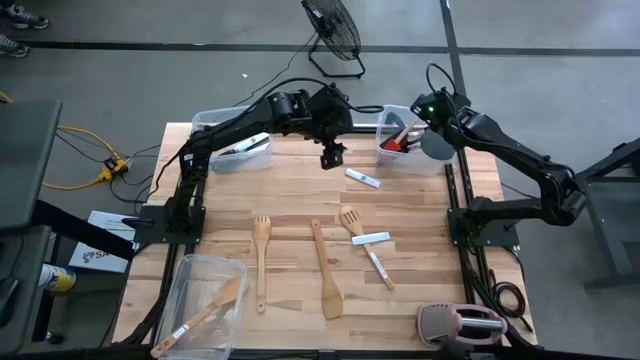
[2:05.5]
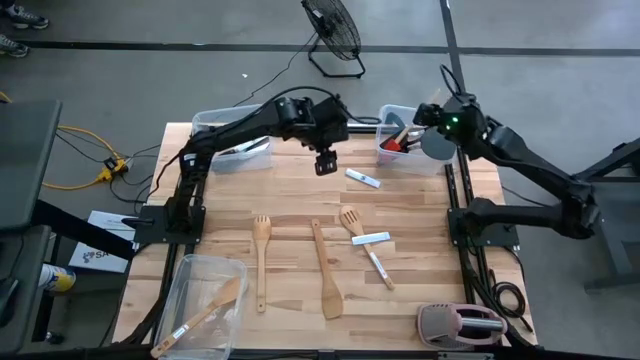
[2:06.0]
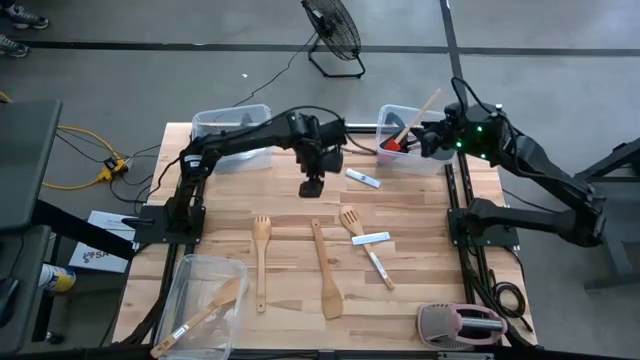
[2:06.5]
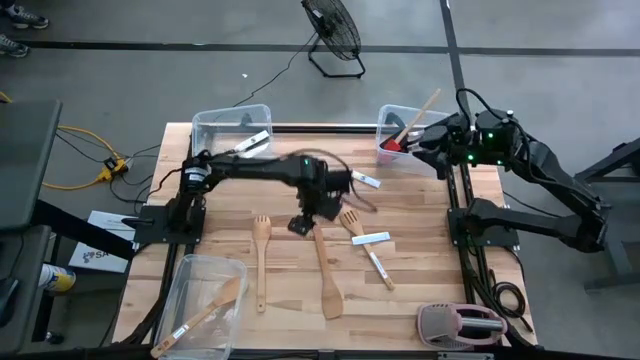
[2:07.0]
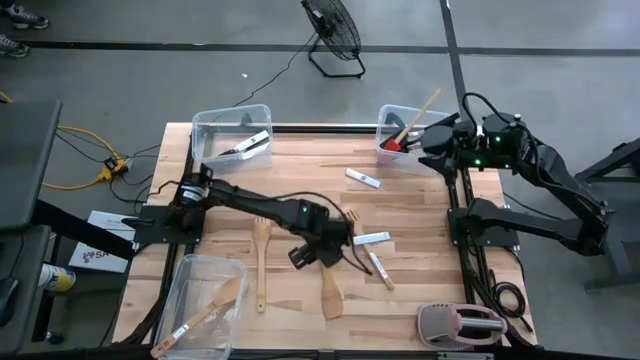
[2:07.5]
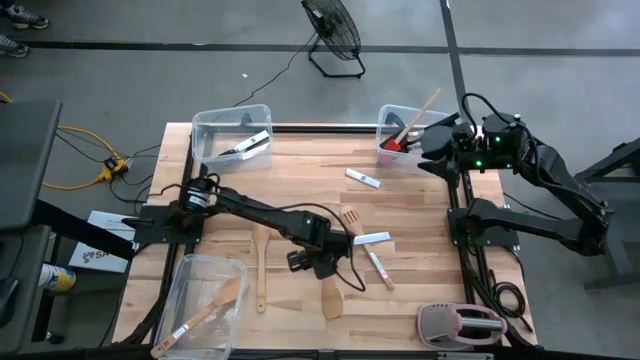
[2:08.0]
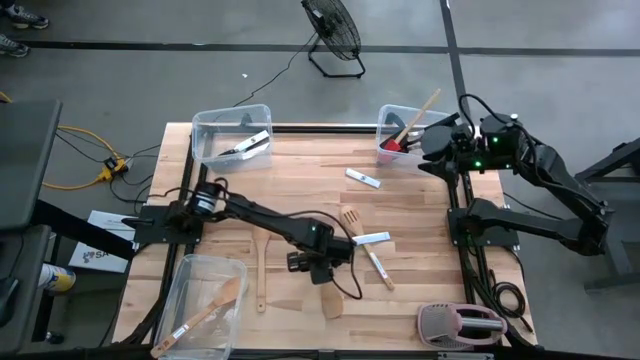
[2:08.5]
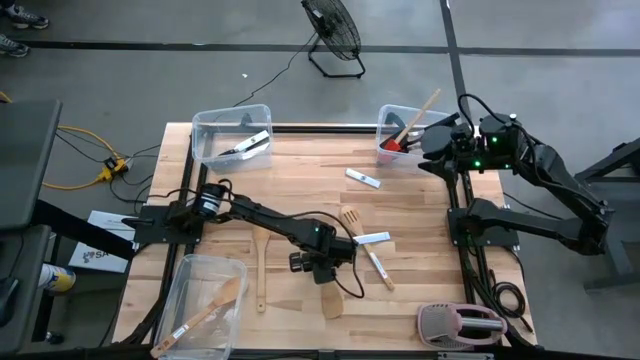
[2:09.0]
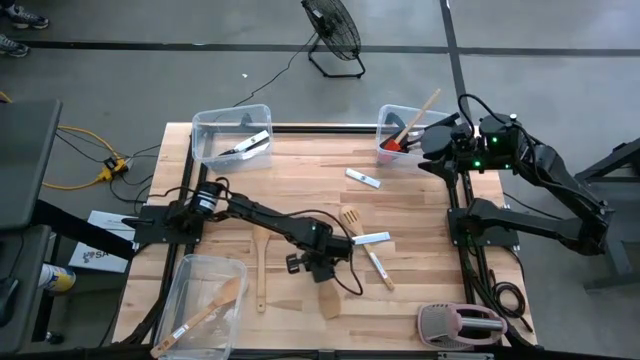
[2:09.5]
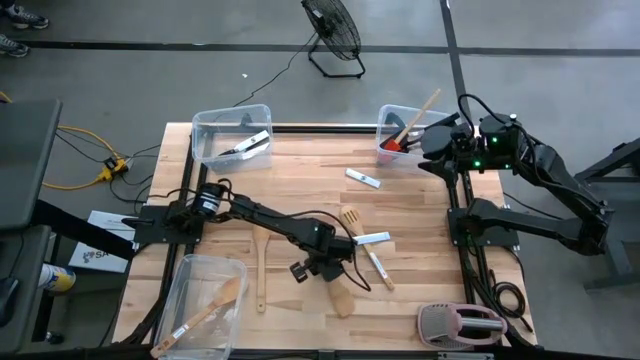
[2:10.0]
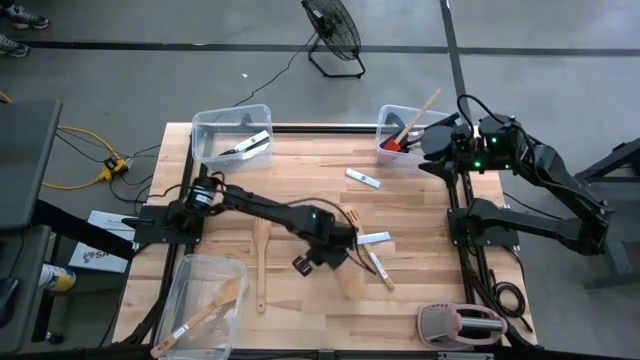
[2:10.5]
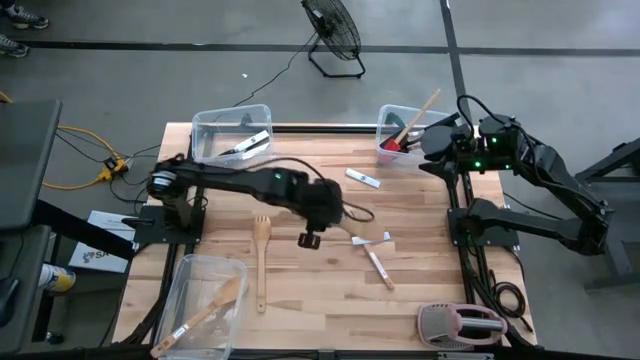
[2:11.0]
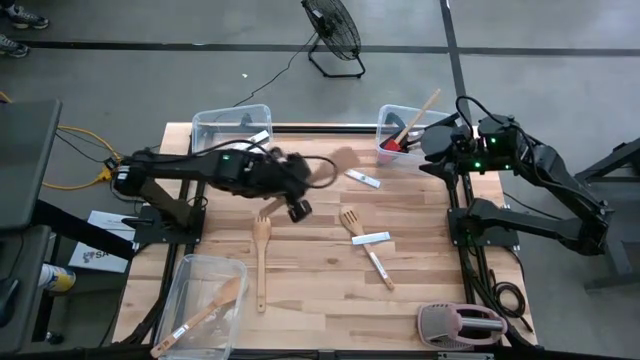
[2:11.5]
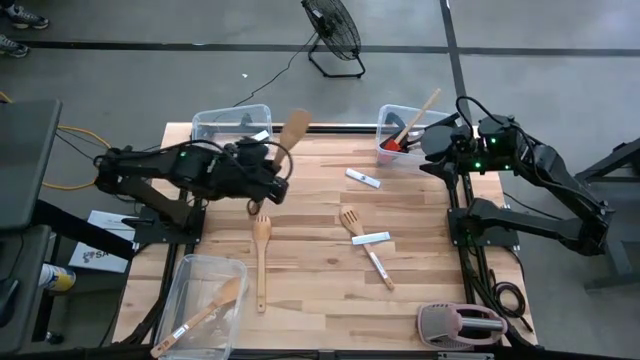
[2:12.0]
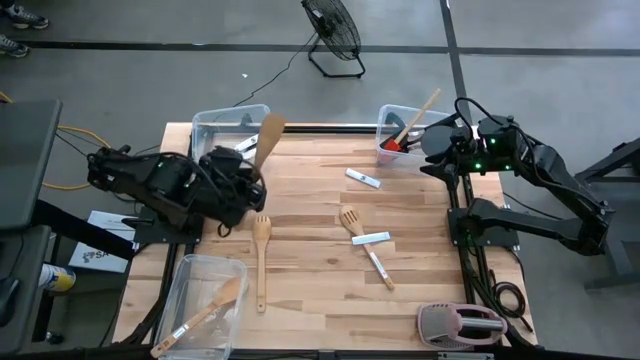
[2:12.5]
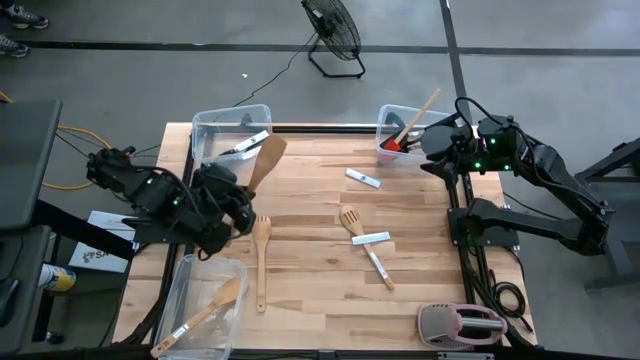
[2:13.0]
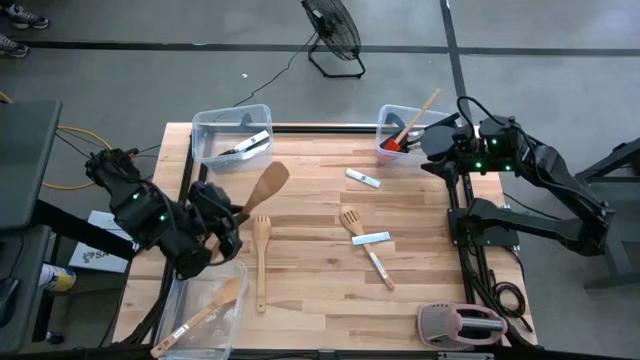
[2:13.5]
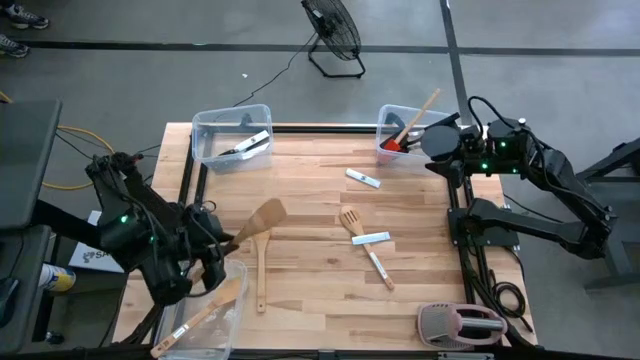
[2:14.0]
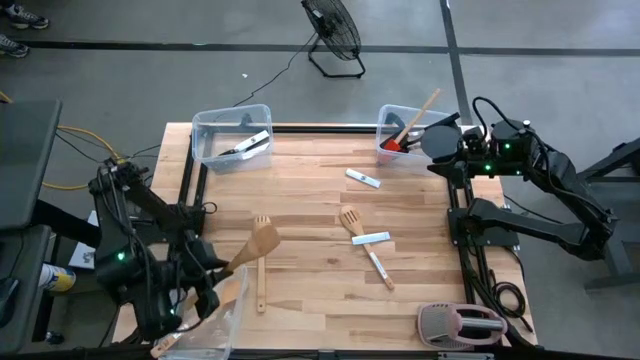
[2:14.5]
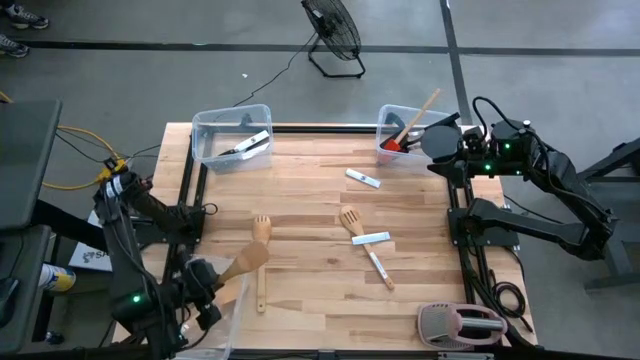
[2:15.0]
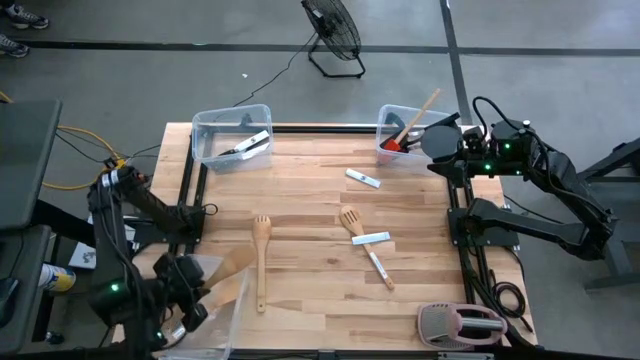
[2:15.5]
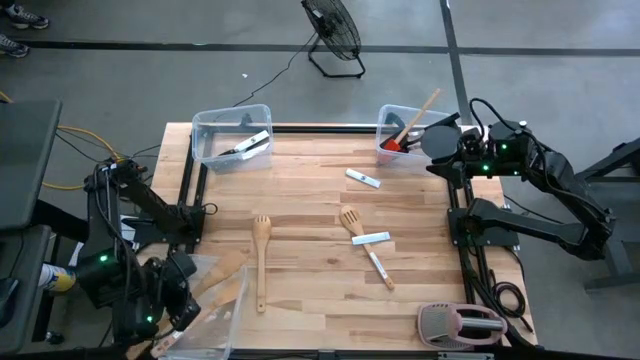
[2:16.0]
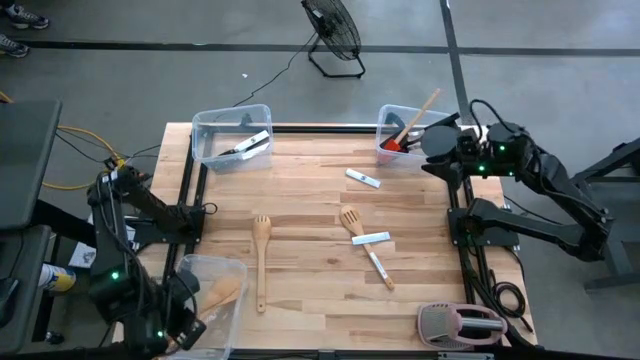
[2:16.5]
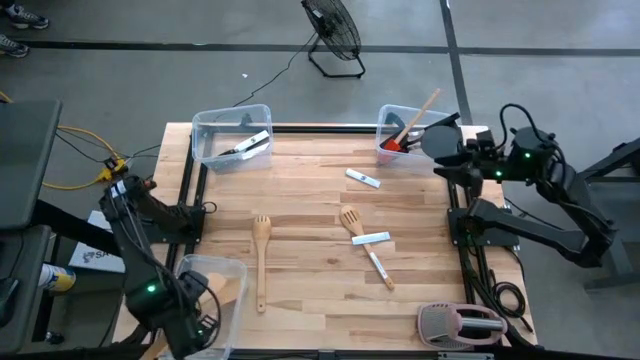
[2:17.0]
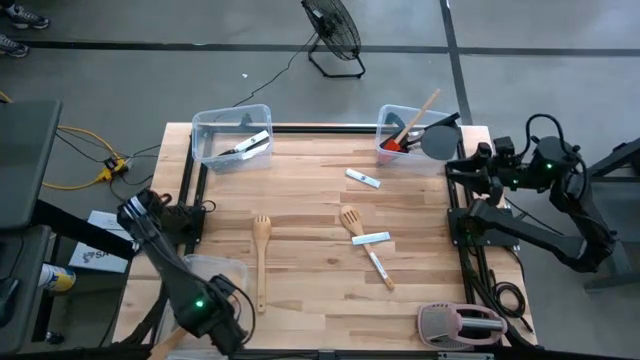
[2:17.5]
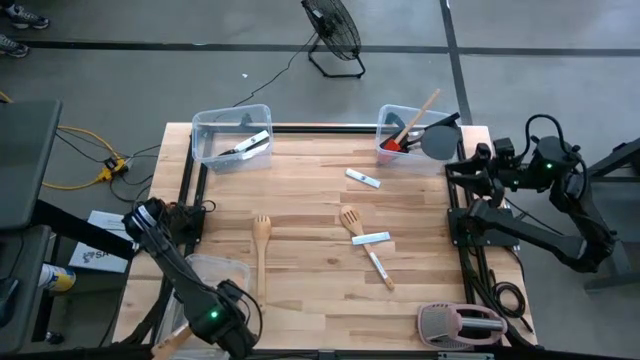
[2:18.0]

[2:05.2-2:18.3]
Task: Pick & Place Kitchen Items
Put the brown serving spoon into the bottom transparent bin

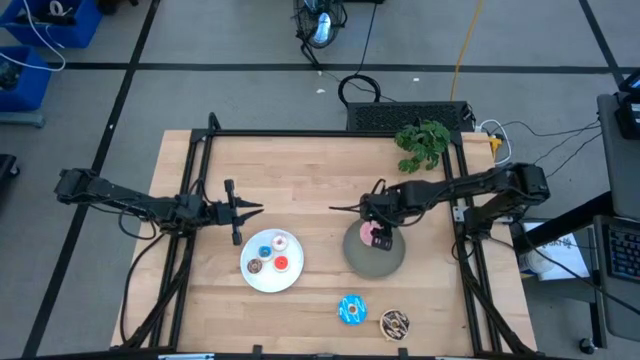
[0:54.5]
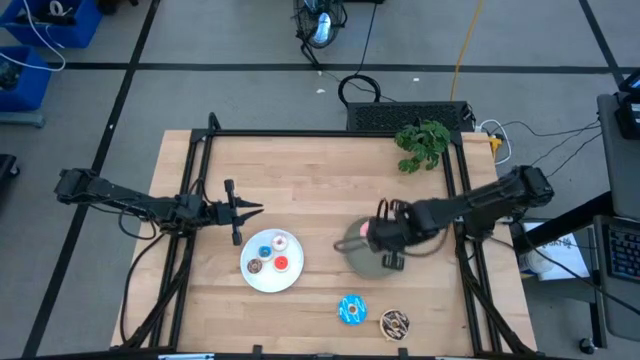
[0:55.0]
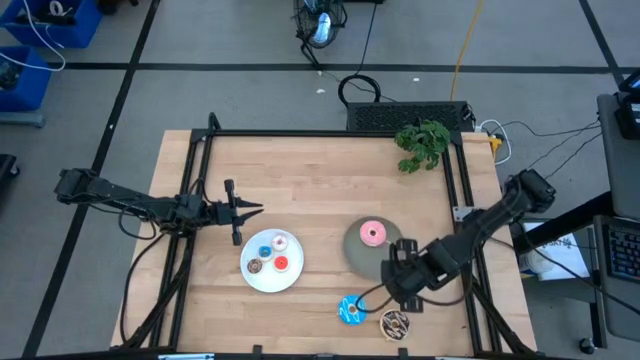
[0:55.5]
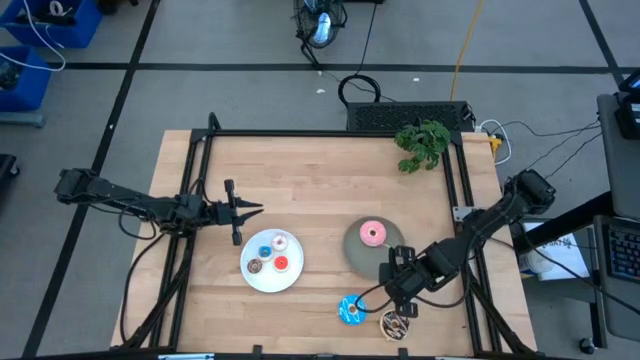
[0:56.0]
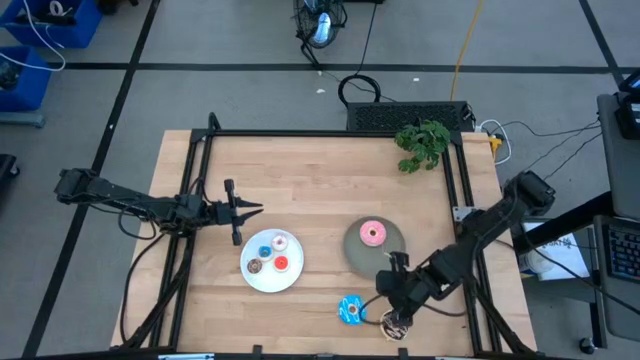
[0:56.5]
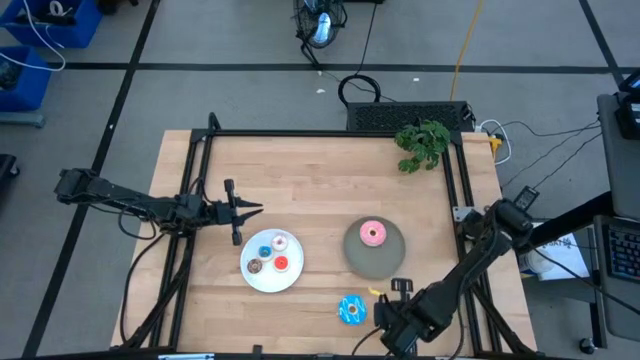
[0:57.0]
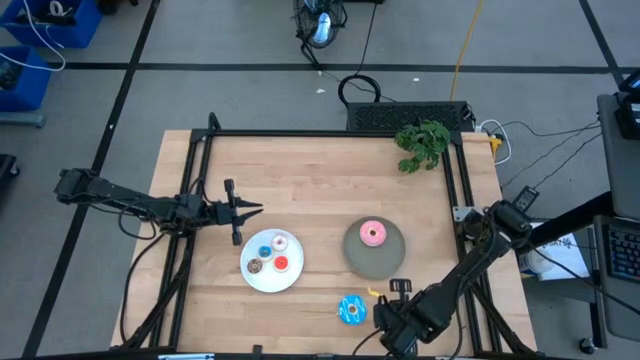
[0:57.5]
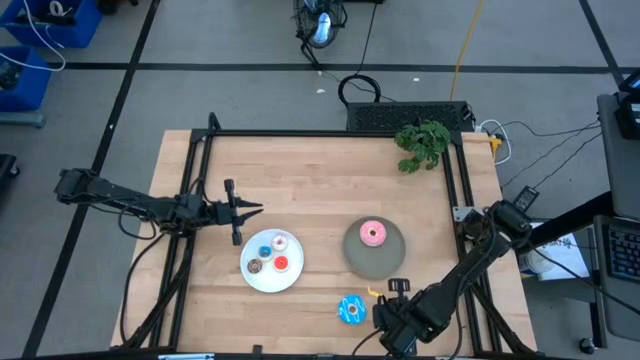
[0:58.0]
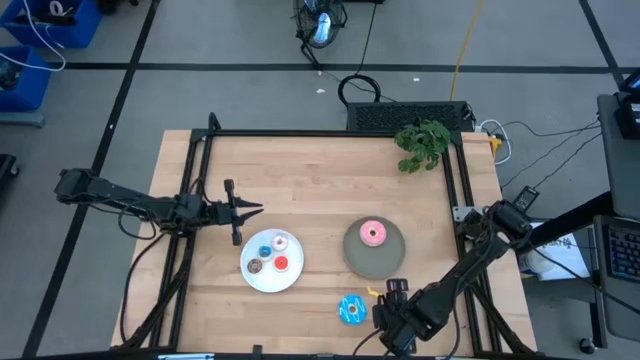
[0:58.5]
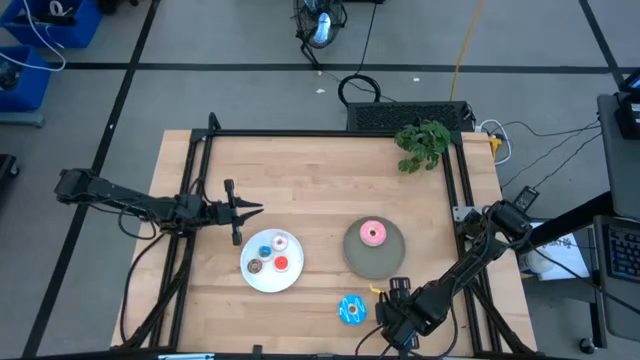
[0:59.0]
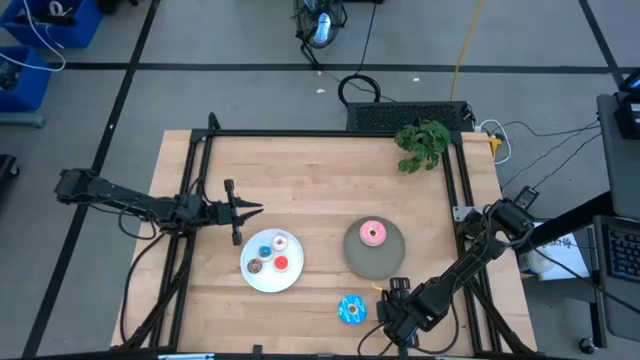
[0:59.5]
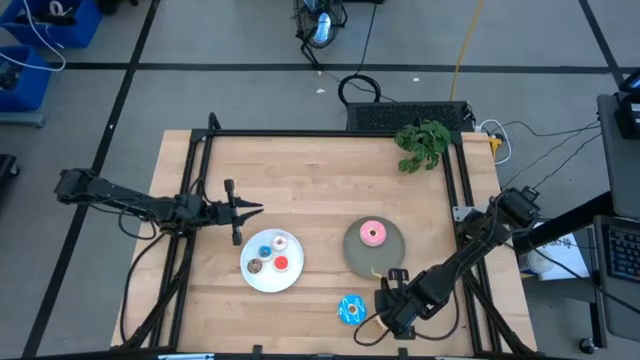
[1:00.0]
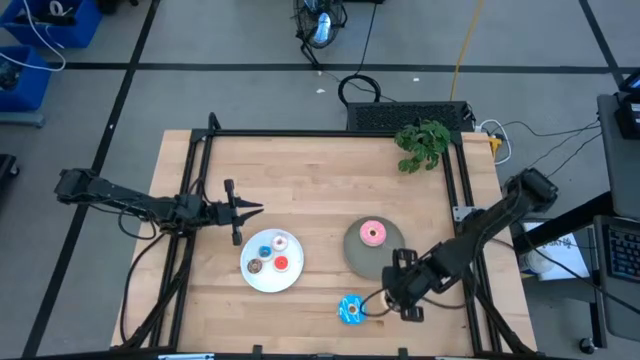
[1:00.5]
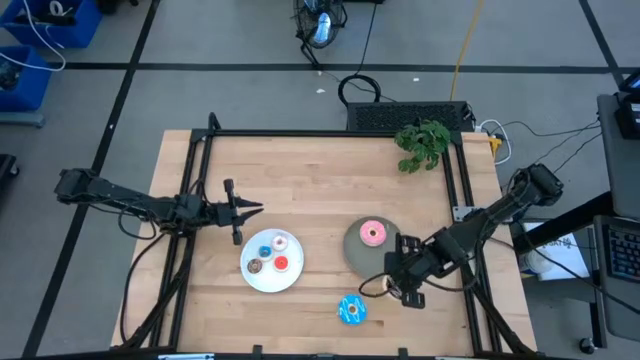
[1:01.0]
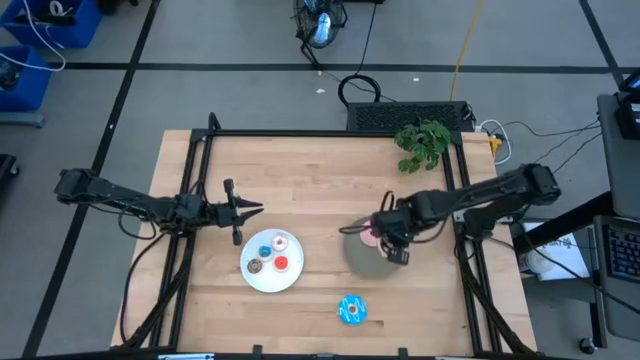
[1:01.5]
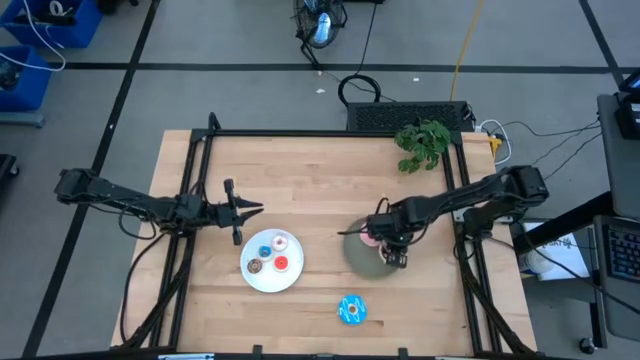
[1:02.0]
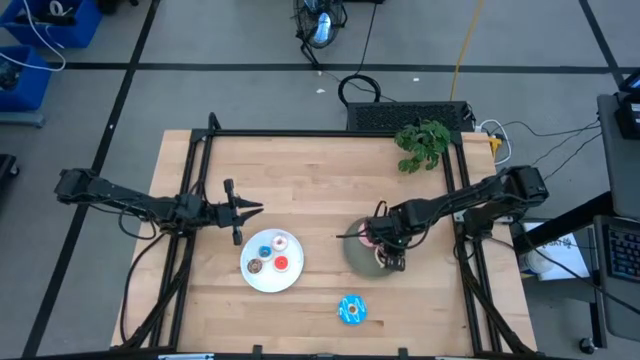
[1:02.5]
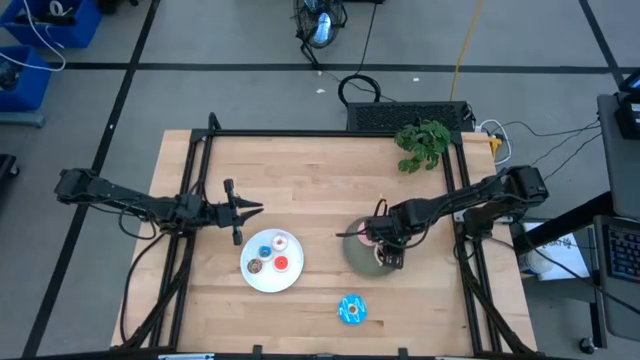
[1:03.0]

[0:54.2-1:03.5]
Task: Pick & Place donuts
Put the large black donut on the gray plate
